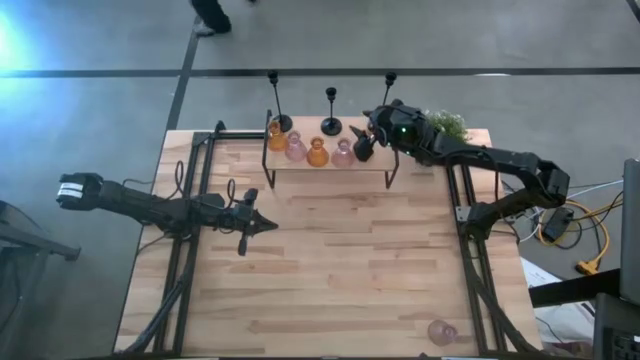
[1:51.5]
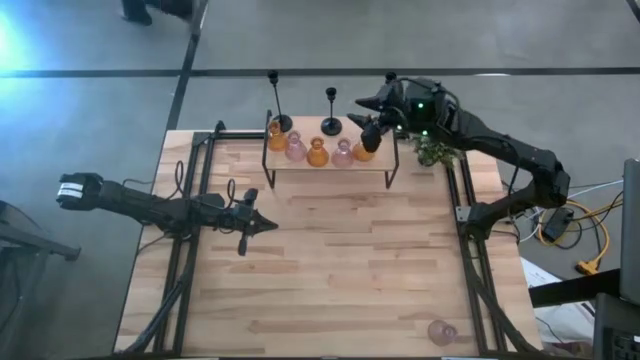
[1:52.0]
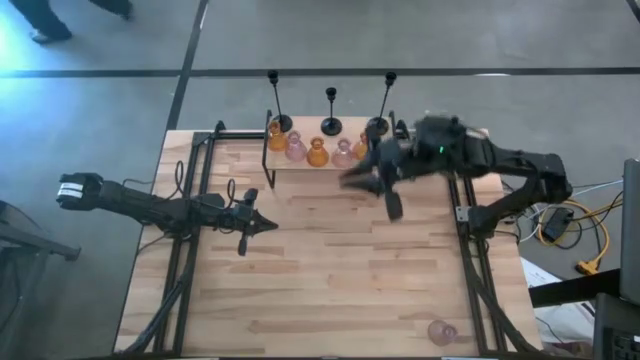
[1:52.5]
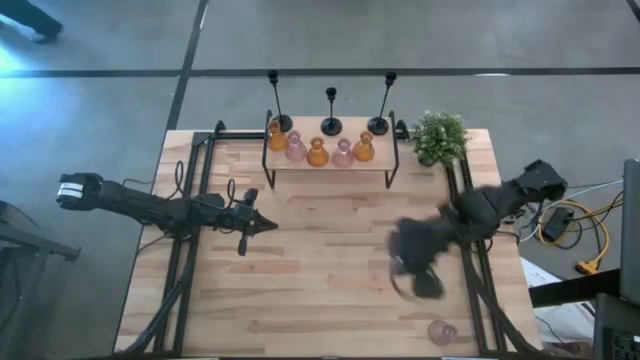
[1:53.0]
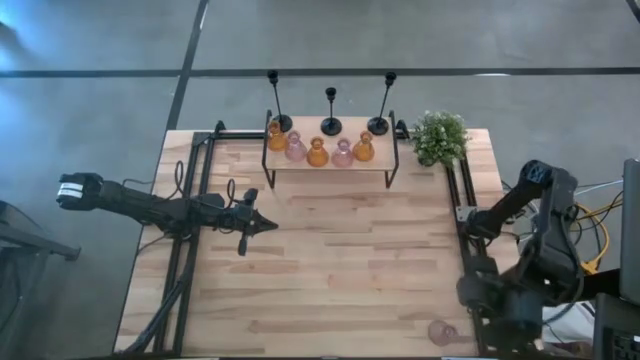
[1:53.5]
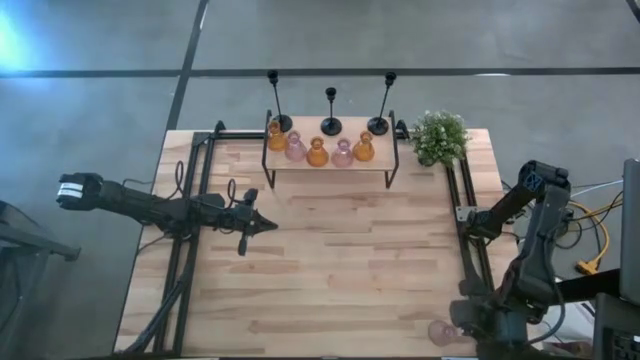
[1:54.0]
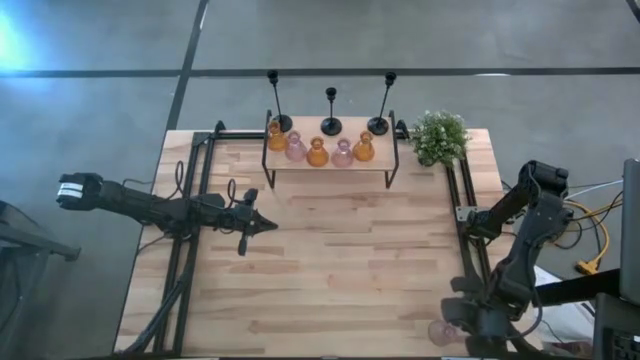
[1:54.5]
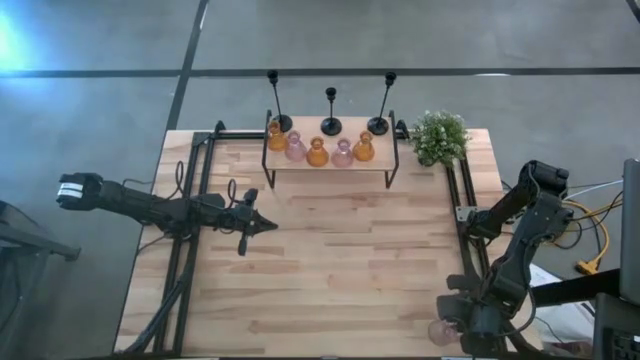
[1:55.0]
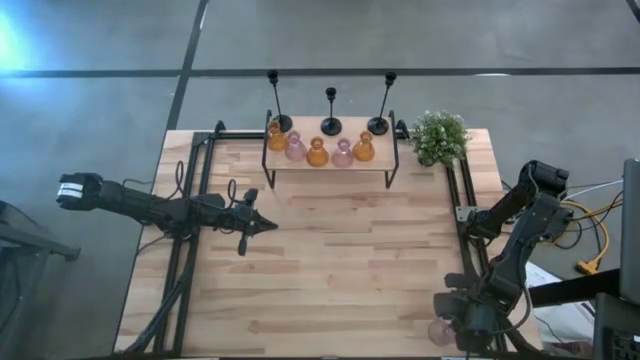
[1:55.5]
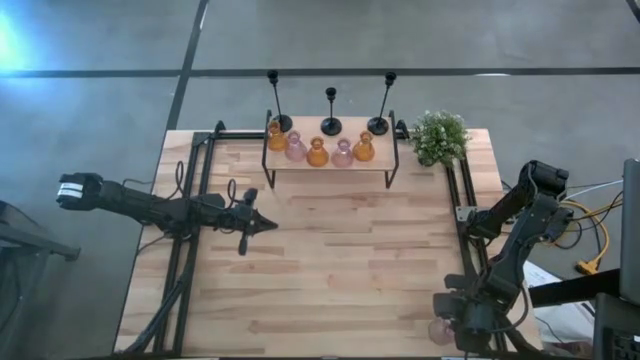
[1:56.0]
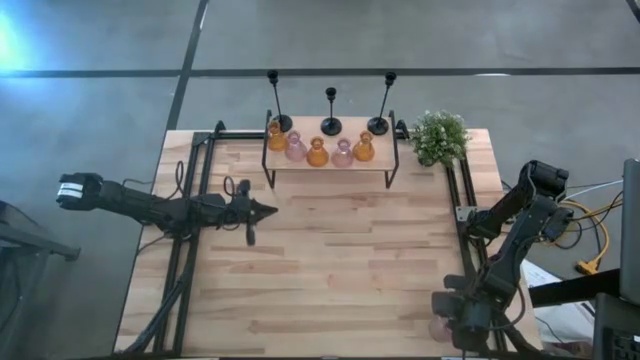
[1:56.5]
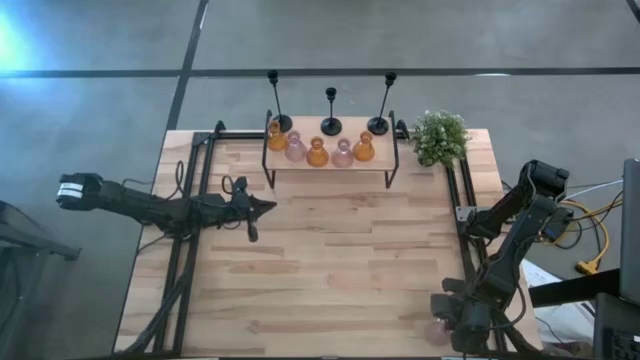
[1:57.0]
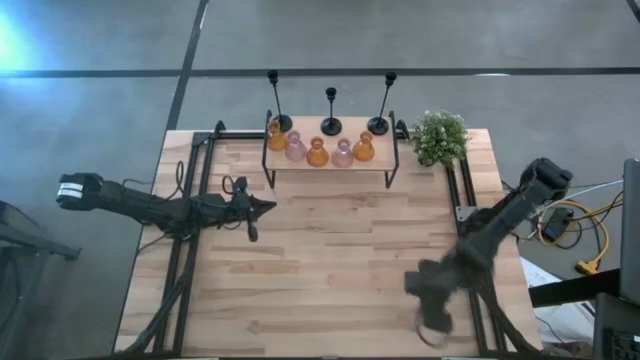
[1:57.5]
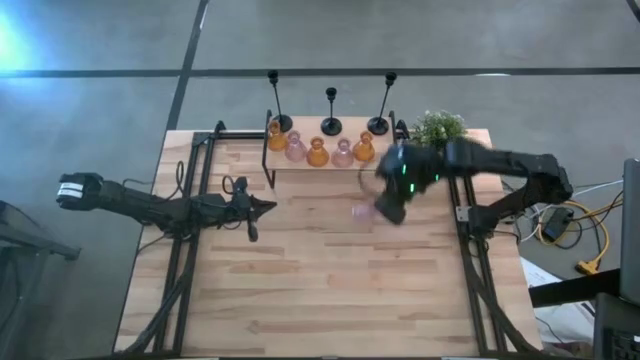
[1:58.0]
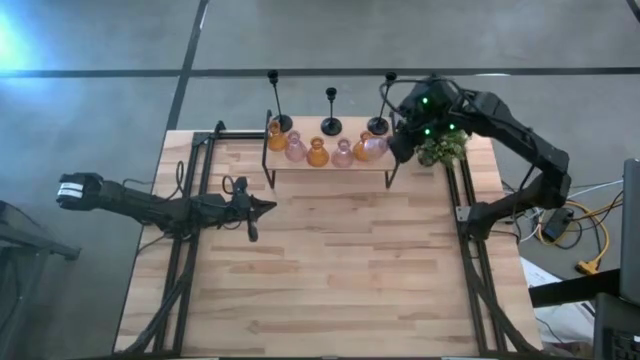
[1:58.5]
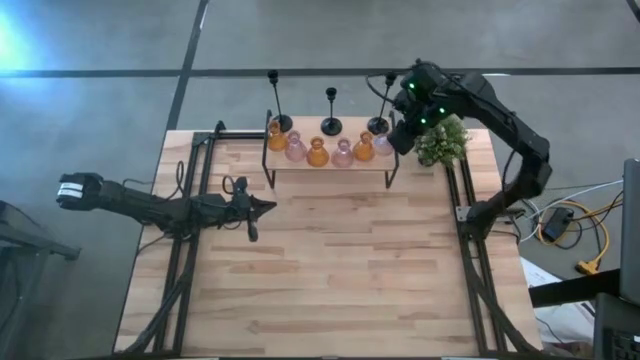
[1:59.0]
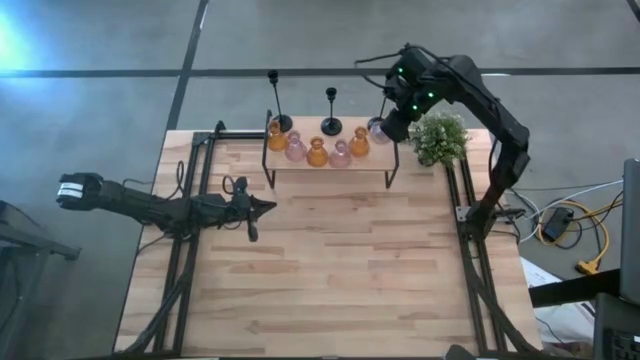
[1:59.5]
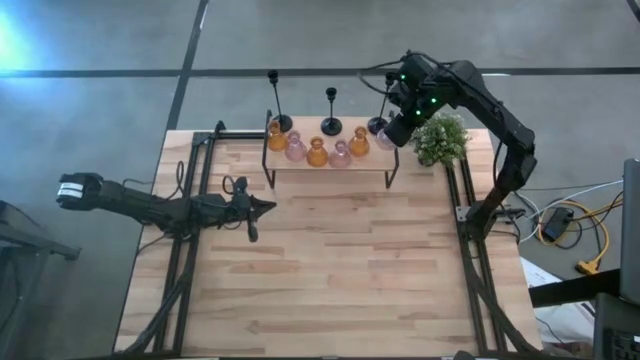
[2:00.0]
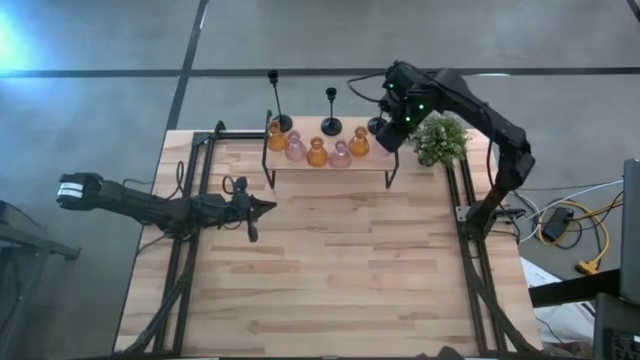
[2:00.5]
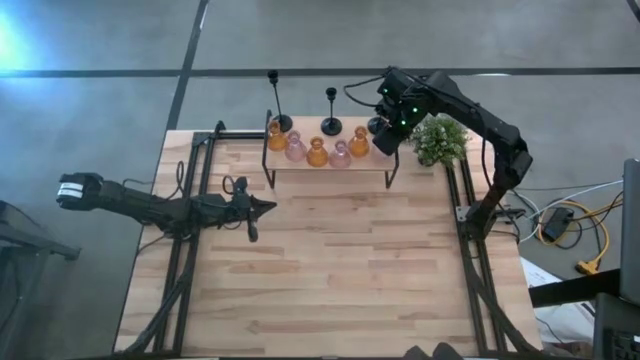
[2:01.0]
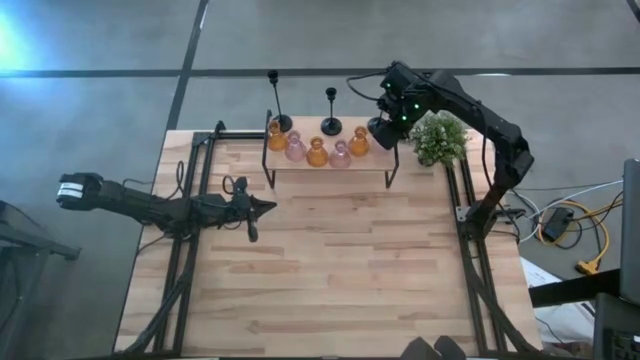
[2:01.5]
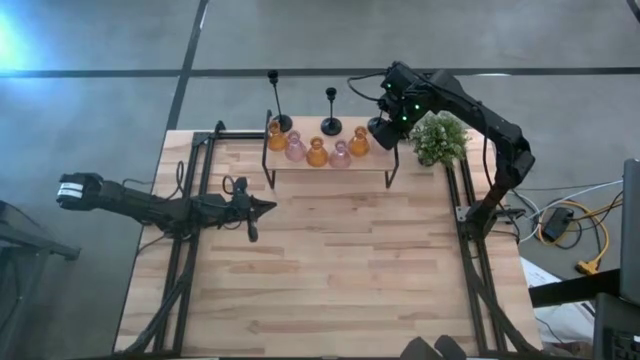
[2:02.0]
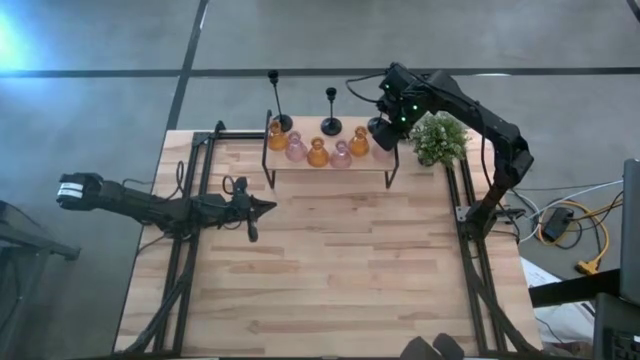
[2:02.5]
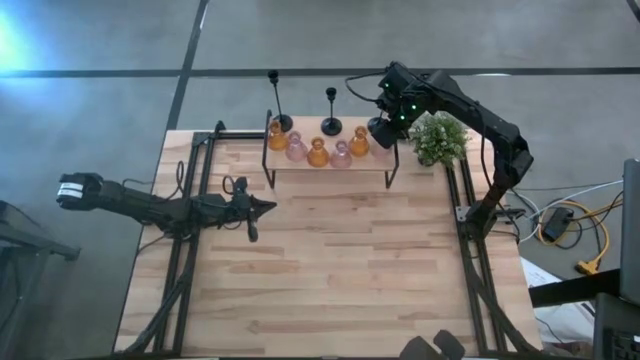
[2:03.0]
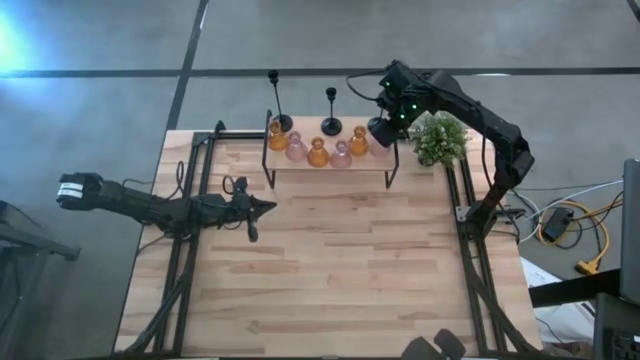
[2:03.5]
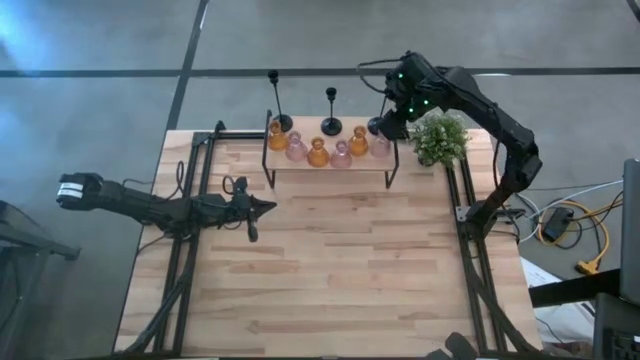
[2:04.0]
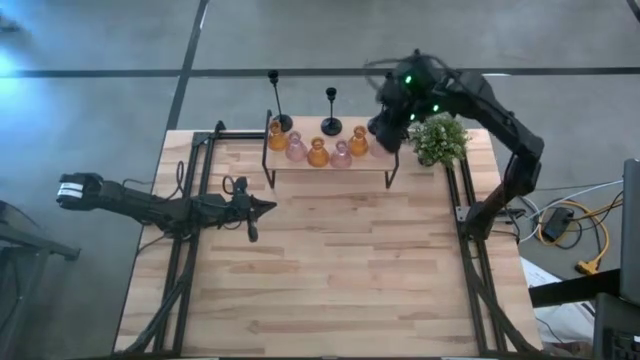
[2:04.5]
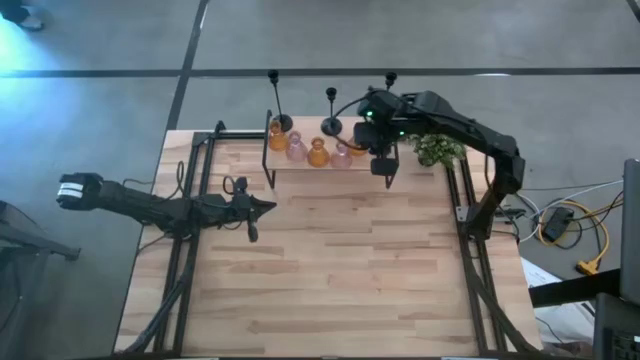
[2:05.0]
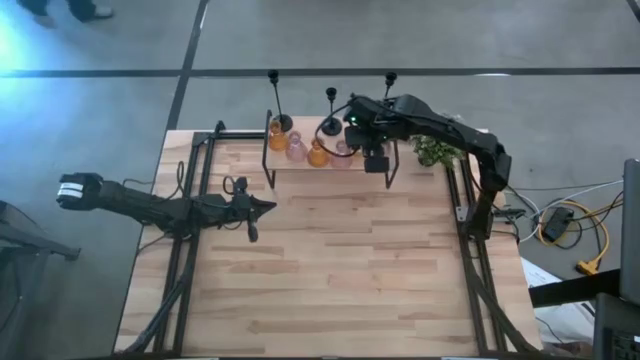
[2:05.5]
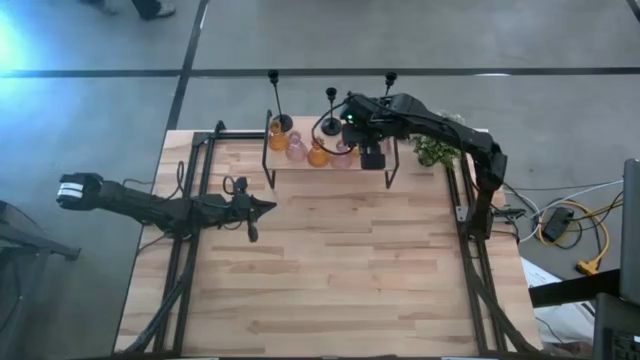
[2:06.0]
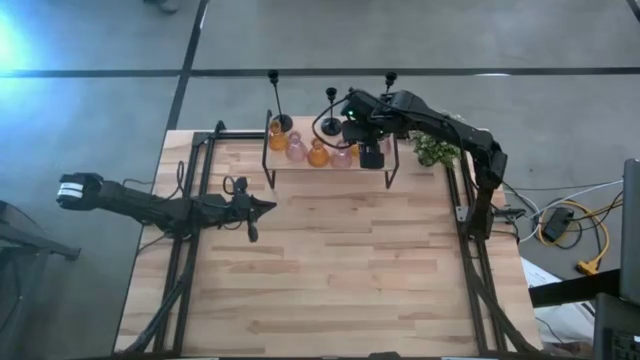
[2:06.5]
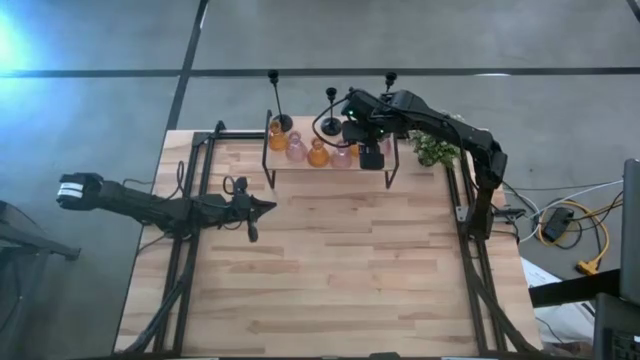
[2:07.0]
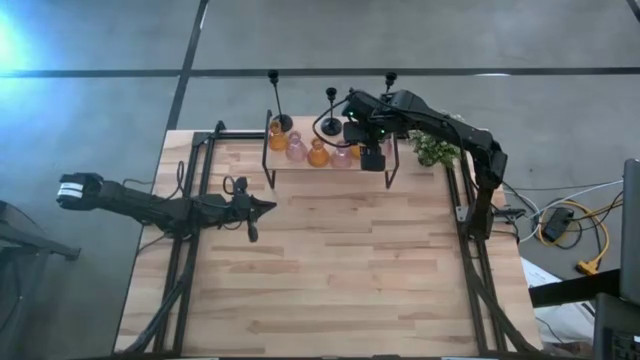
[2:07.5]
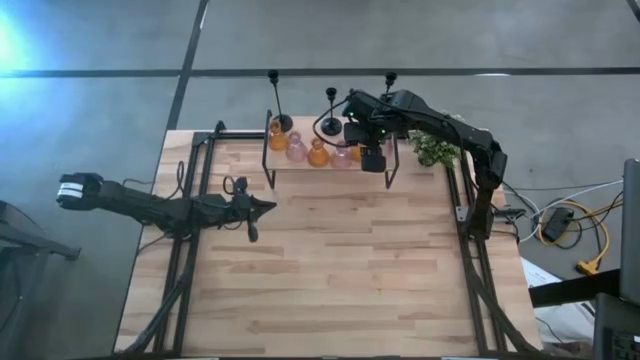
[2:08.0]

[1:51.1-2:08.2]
Task: Pick & Place candle stick holders
Put the pink candle holder on the shelf

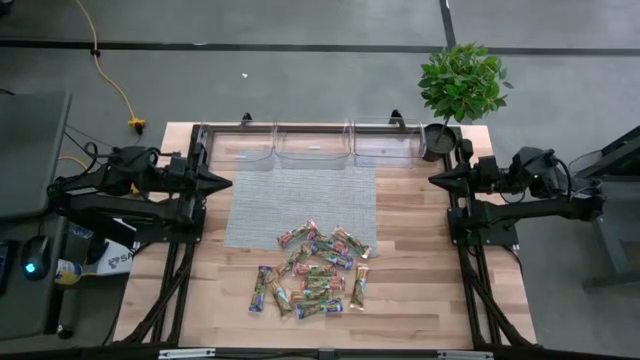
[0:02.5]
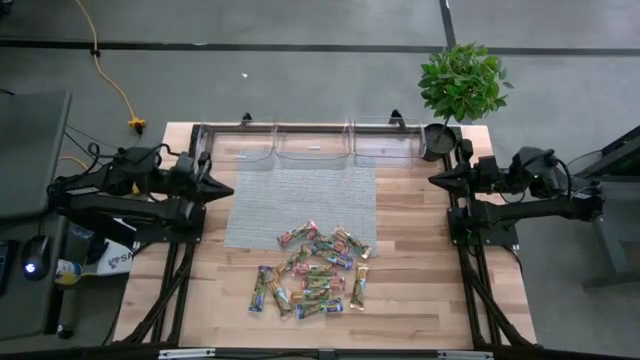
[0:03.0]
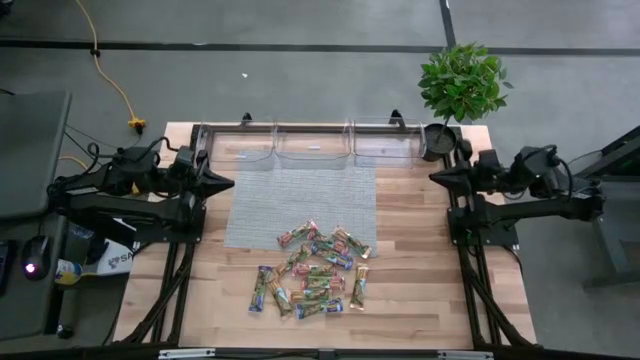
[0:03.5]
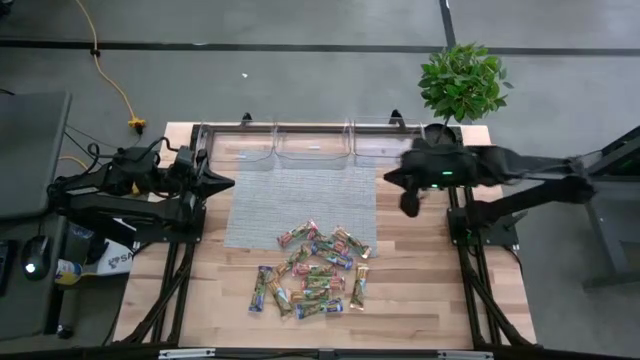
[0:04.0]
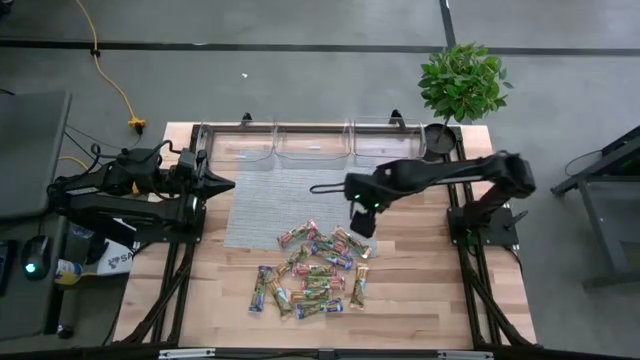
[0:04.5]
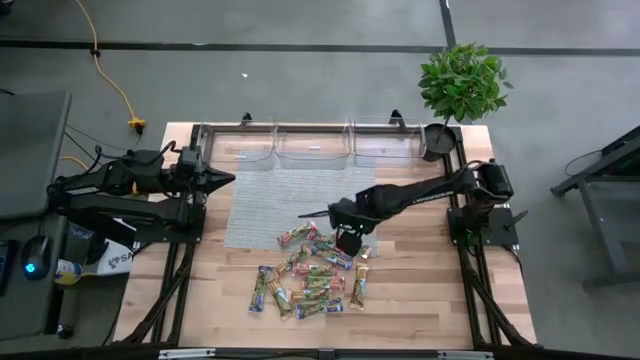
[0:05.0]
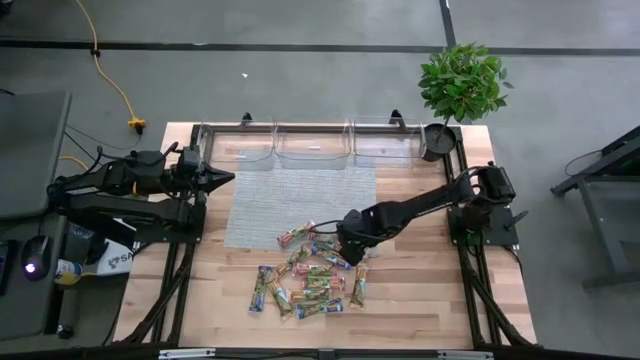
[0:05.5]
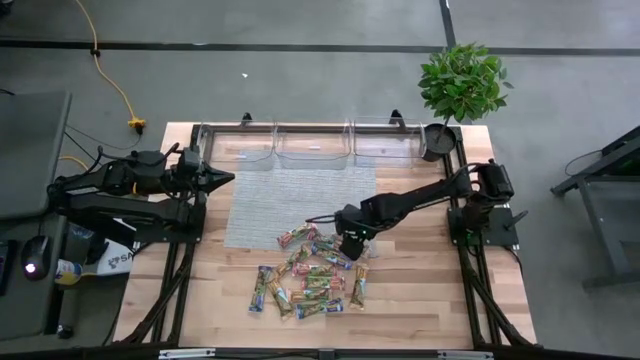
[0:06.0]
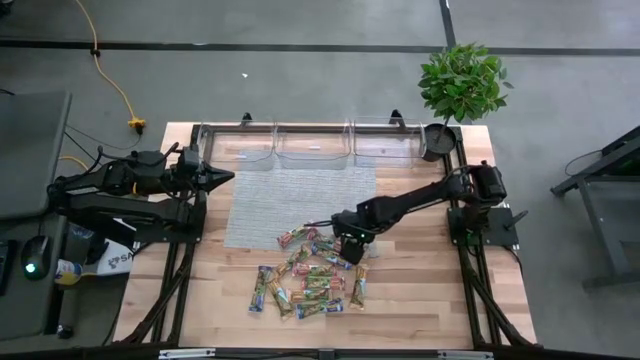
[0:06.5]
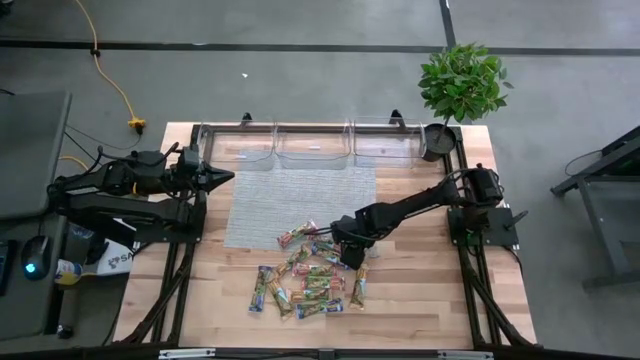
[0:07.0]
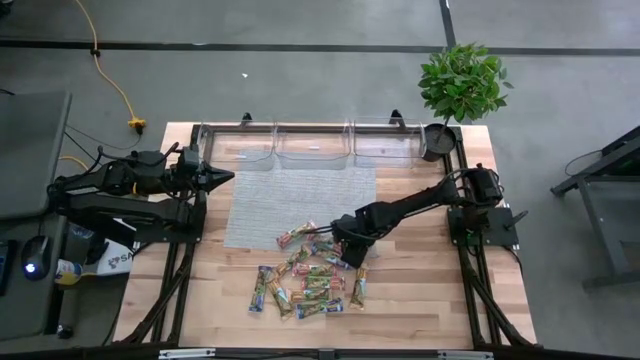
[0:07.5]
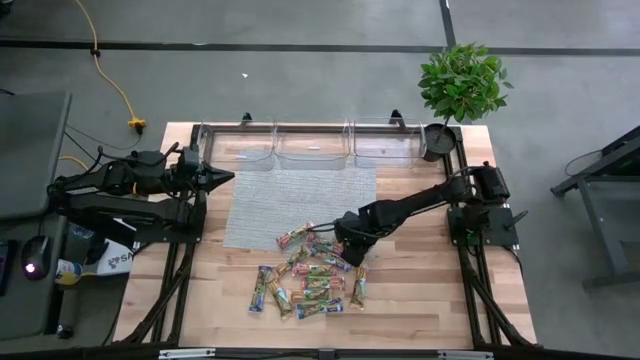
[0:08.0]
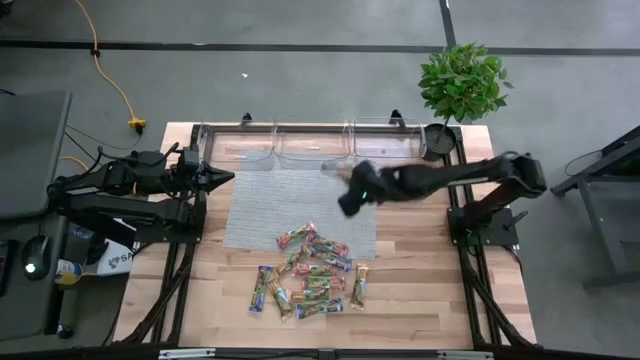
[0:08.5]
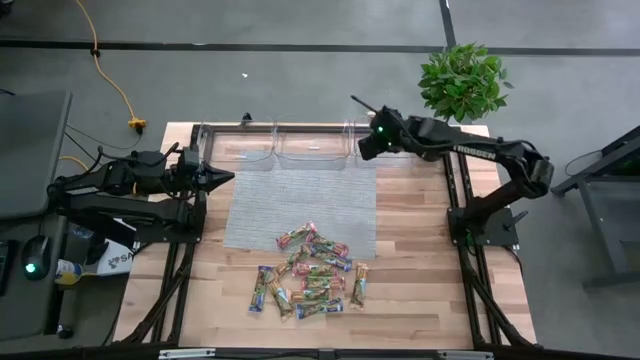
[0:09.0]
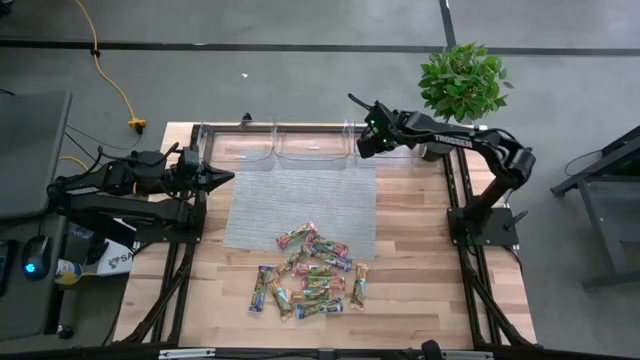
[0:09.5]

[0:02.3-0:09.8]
Task: Pick and place Granola Bars by type
Put the yellow granola bar into the right transparent bin
